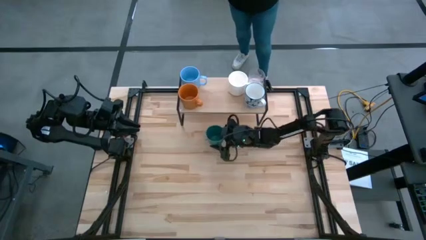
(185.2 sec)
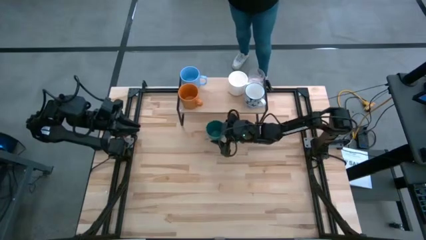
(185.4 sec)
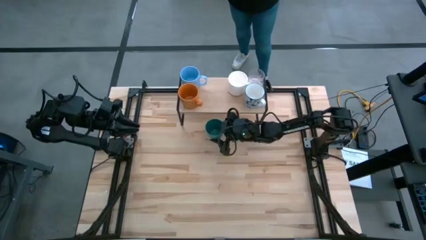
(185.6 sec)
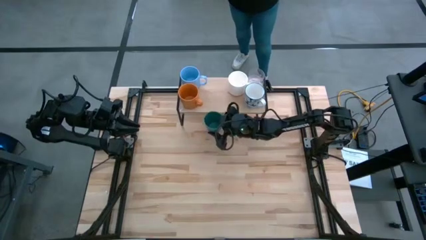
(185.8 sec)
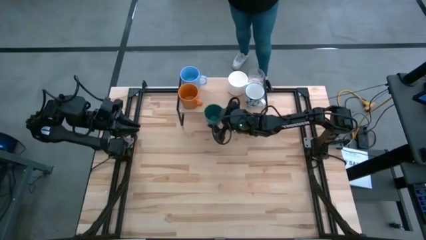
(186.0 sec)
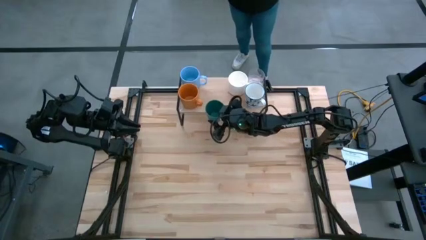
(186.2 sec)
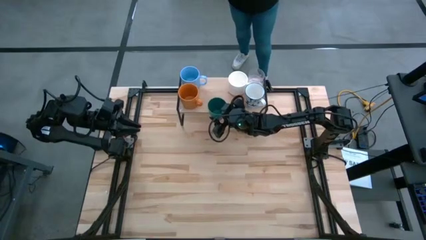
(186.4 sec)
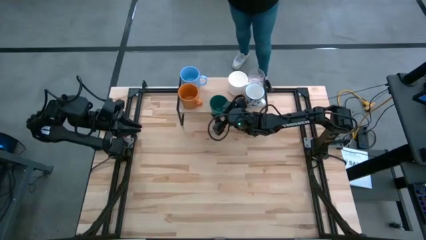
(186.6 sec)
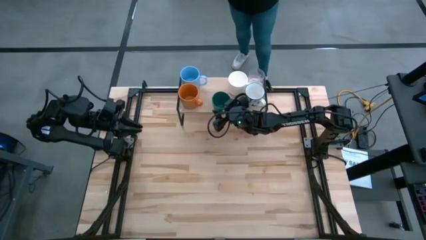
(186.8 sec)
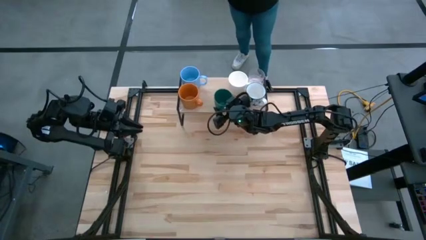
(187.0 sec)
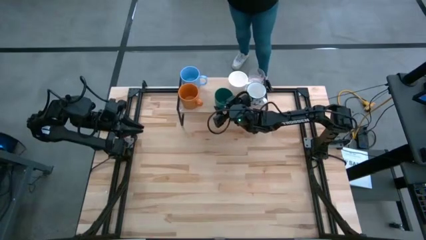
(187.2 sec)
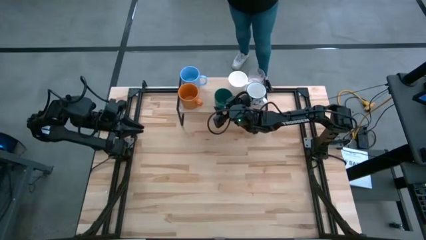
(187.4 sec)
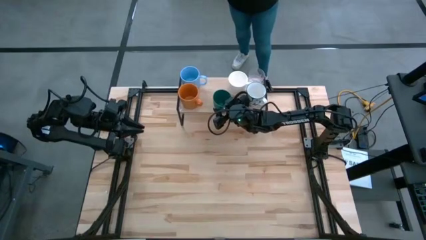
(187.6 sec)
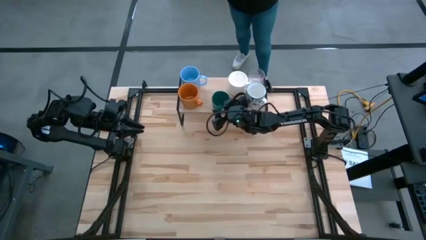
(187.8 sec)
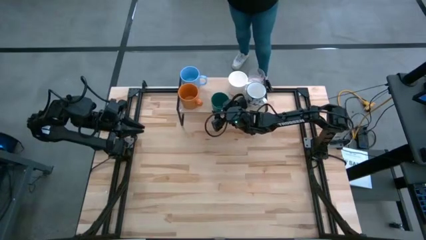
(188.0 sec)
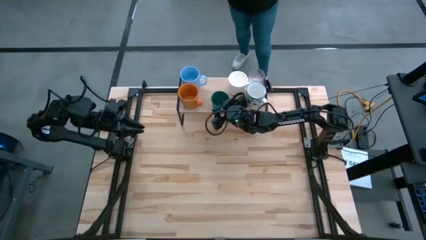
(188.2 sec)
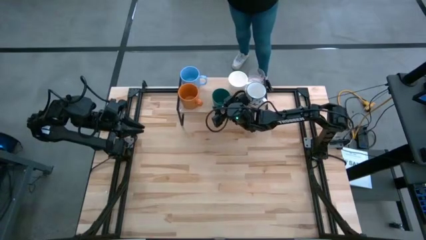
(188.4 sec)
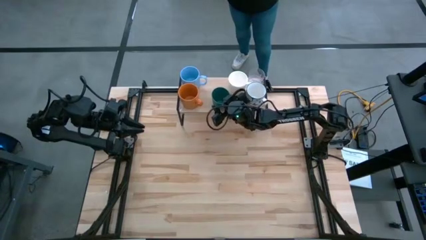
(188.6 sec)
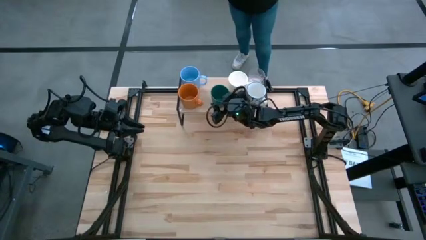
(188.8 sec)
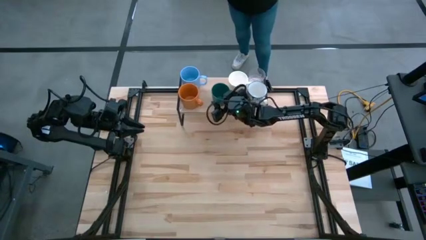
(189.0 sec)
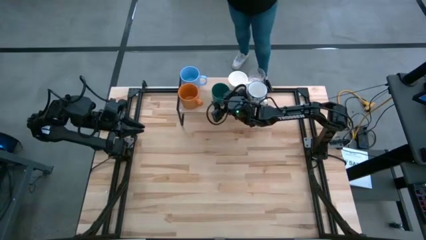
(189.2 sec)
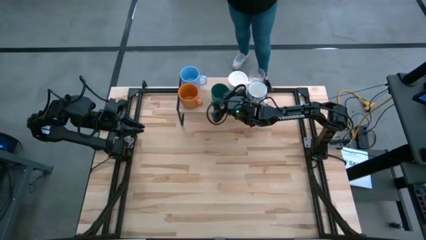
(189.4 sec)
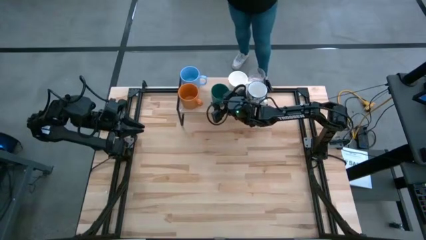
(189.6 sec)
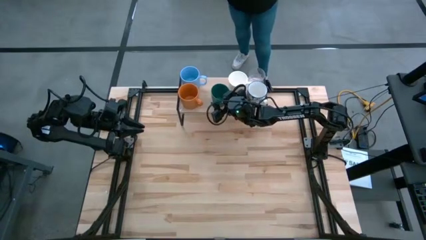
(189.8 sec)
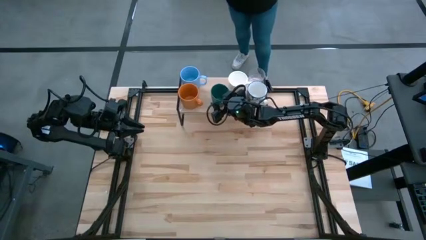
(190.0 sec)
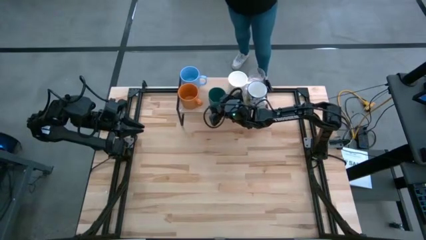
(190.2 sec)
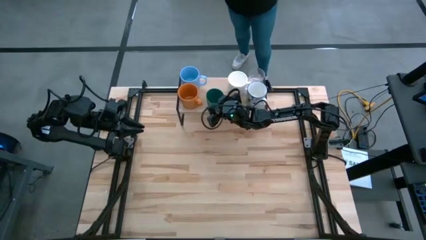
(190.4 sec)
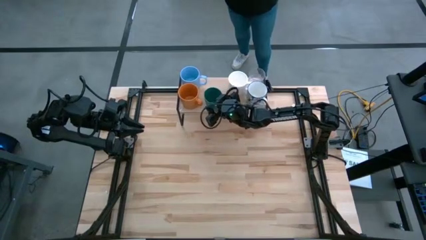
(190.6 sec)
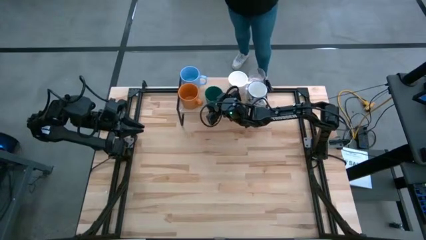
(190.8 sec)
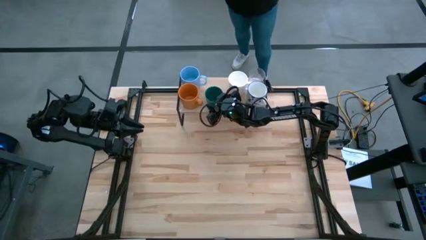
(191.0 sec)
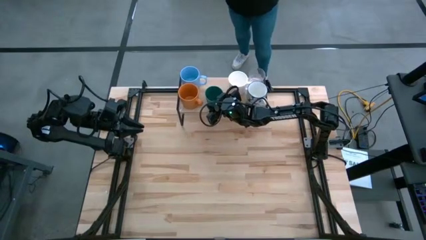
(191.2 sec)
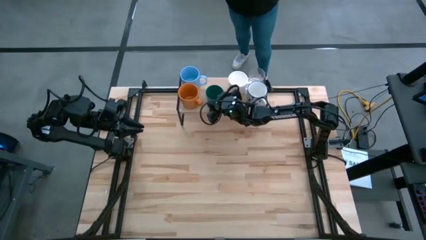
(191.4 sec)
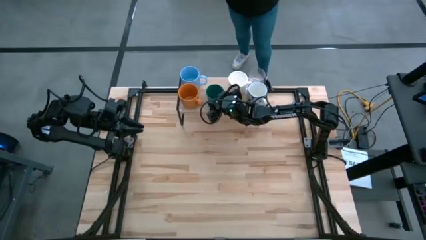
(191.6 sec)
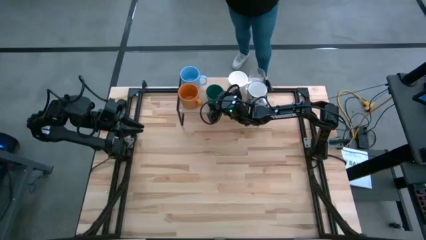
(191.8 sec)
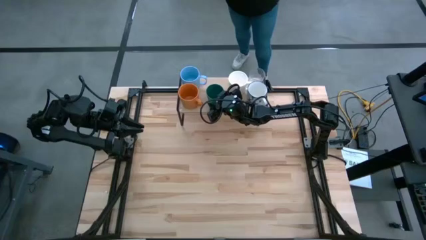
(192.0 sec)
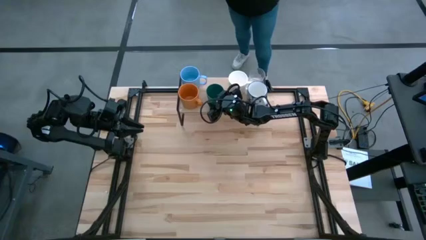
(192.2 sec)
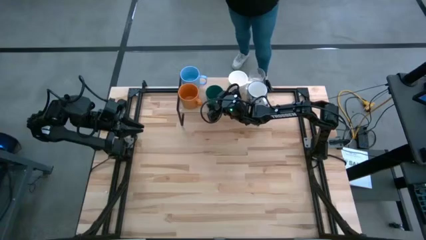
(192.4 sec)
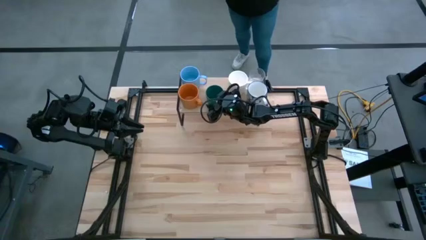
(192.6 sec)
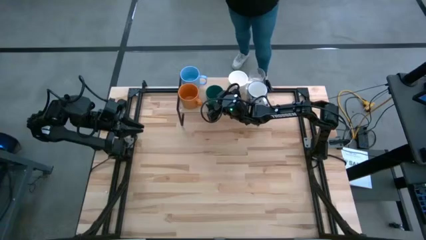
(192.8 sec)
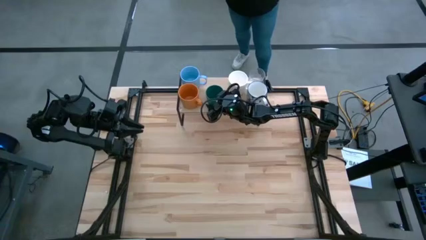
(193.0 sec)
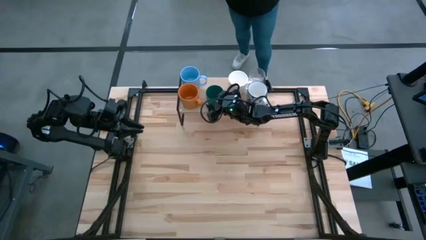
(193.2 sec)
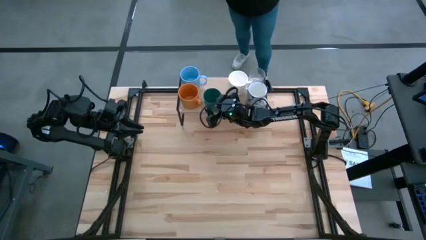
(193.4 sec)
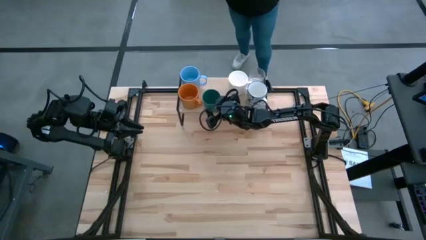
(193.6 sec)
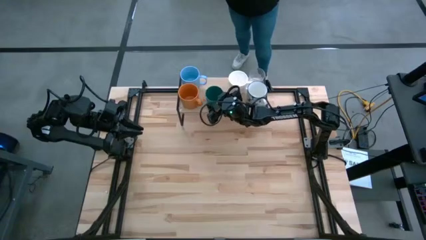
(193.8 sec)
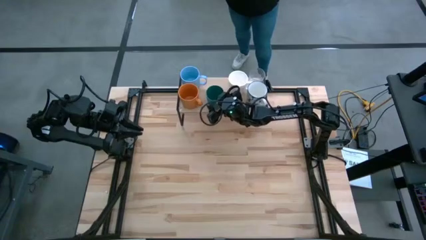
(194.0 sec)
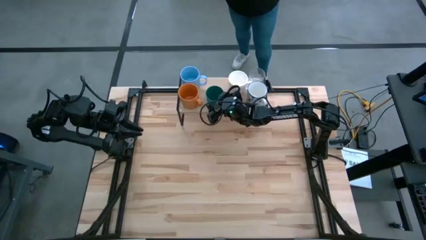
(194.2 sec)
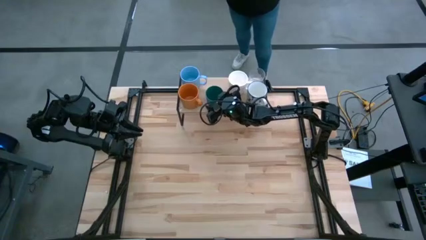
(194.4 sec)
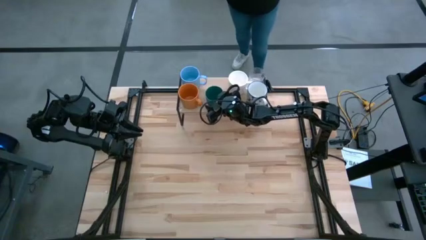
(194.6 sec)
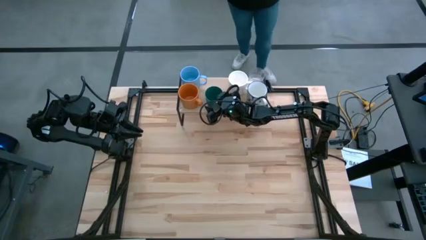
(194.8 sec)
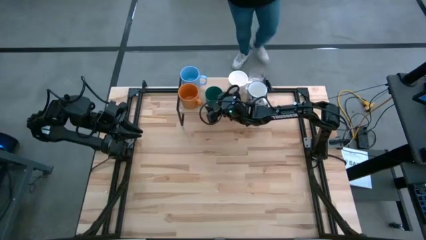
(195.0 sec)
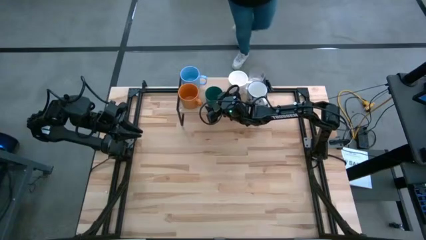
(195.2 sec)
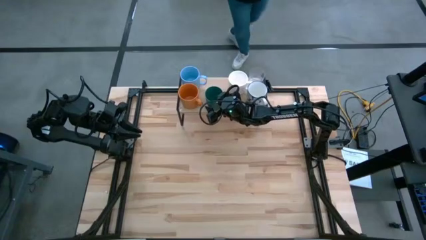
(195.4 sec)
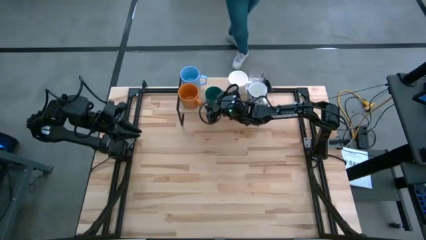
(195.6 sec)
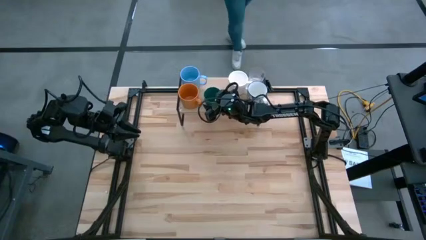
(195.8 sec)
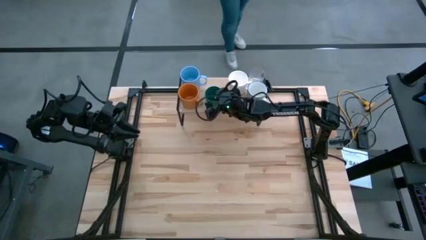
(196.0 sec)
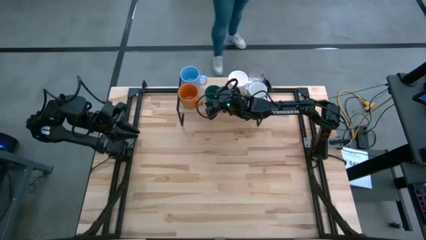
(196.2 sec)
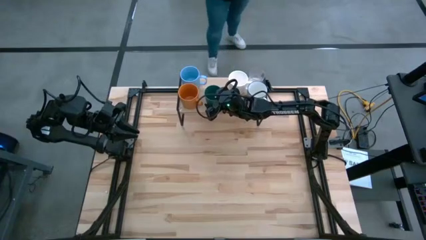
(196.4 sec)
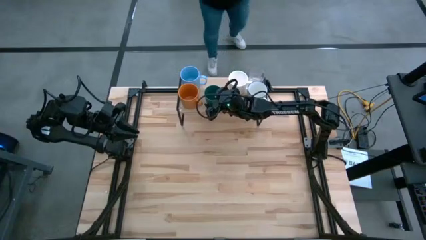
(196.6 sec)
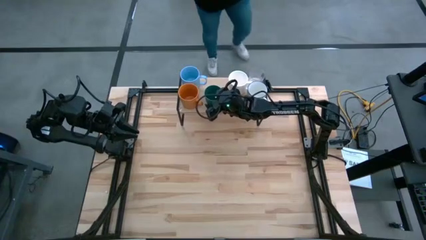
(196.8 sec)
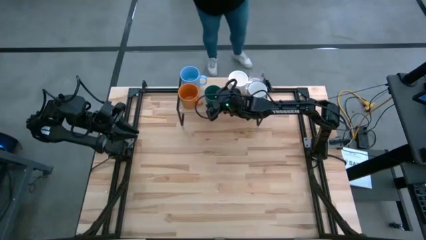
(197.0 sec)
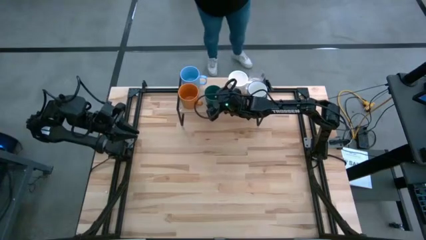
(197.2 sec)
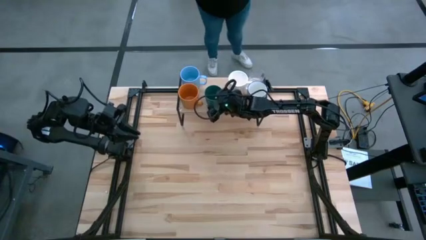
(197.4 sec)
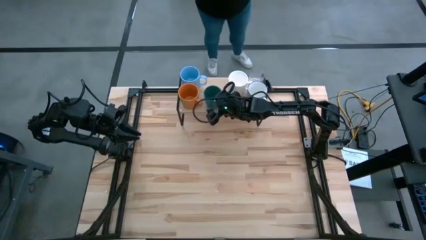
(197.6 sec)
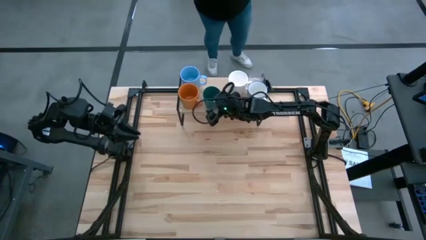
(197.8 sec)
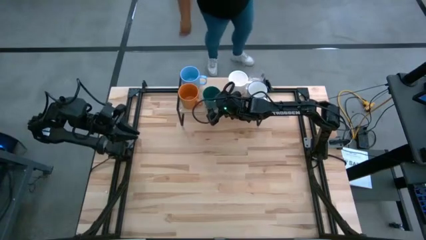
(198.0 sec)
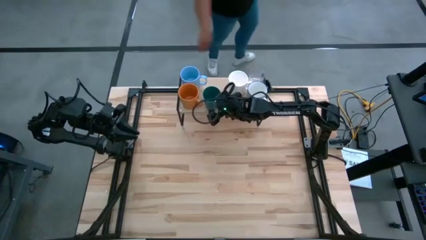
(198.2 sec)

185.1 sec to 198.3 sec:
Task: Stack small to large cups/mugs on shelf
Put the green cup on the shelf

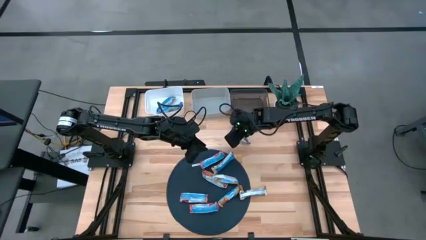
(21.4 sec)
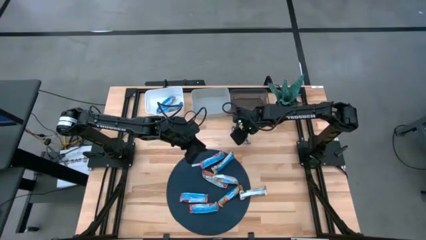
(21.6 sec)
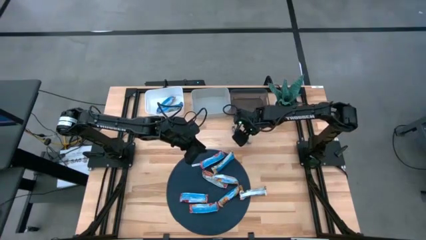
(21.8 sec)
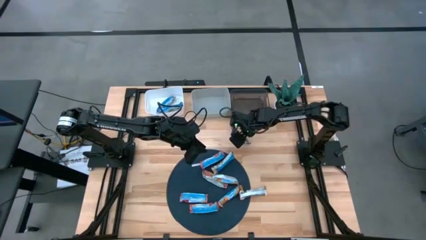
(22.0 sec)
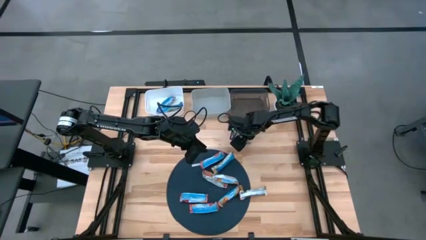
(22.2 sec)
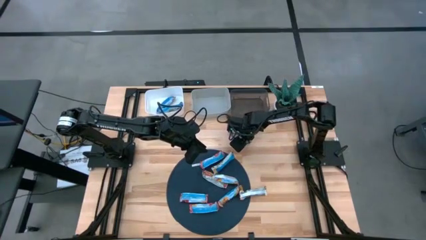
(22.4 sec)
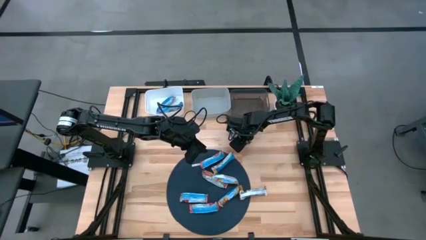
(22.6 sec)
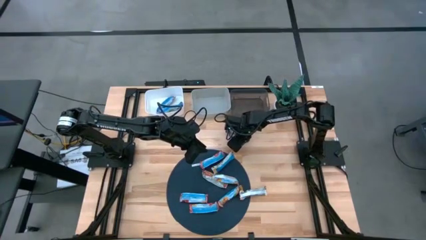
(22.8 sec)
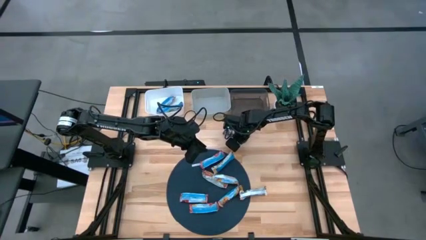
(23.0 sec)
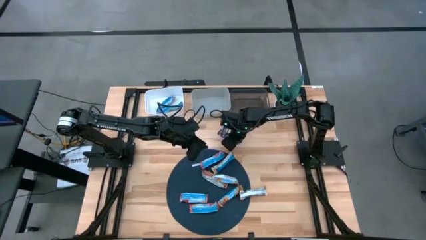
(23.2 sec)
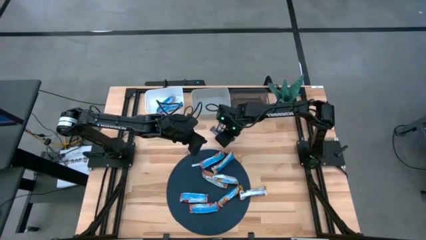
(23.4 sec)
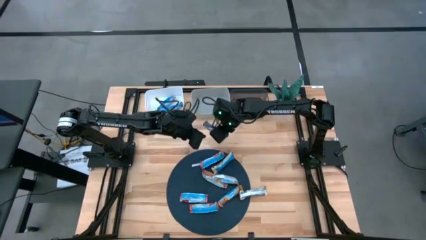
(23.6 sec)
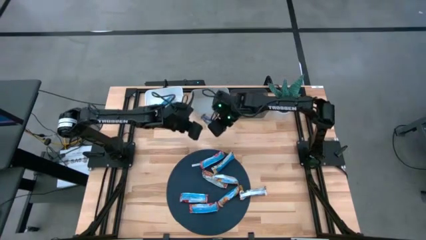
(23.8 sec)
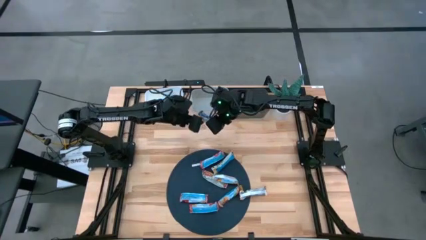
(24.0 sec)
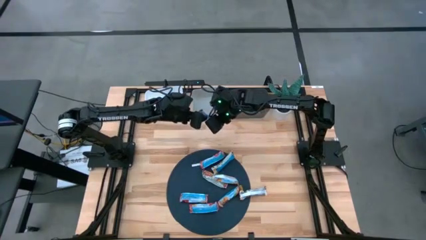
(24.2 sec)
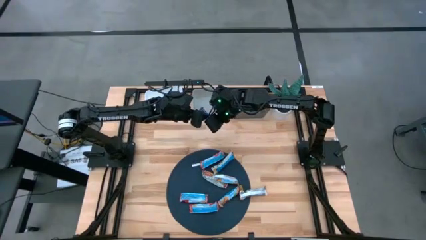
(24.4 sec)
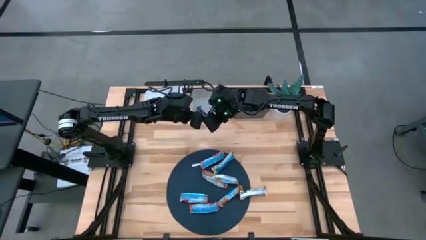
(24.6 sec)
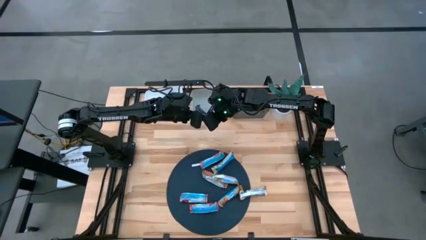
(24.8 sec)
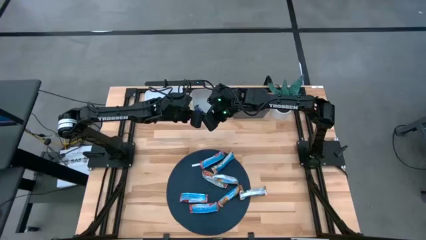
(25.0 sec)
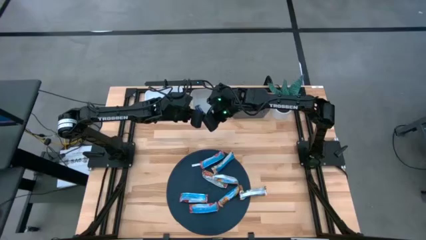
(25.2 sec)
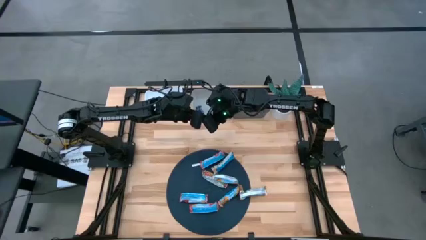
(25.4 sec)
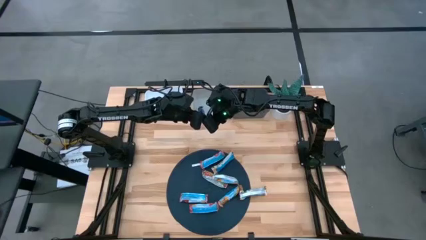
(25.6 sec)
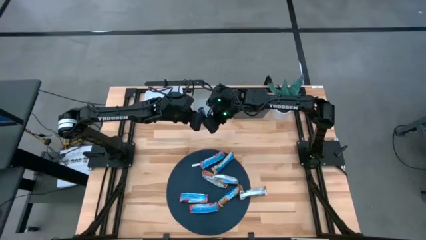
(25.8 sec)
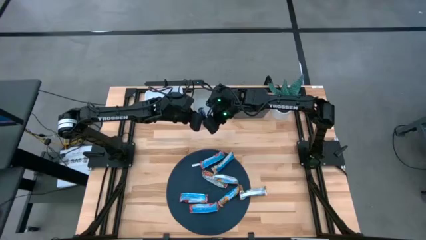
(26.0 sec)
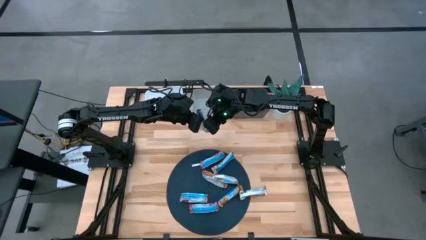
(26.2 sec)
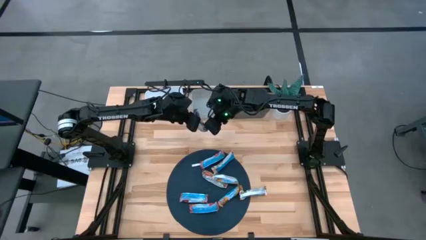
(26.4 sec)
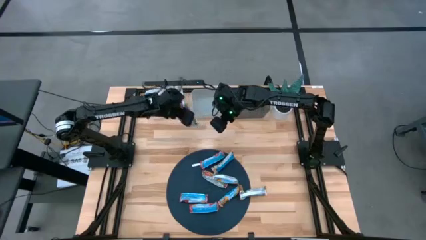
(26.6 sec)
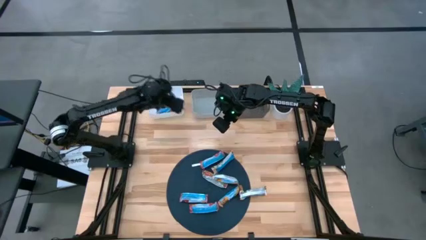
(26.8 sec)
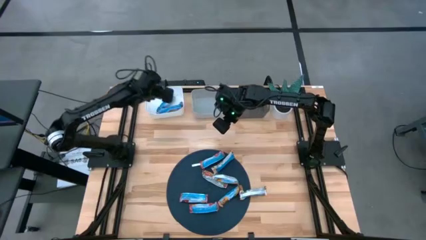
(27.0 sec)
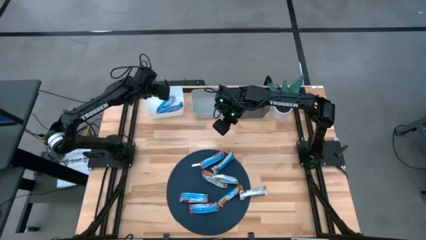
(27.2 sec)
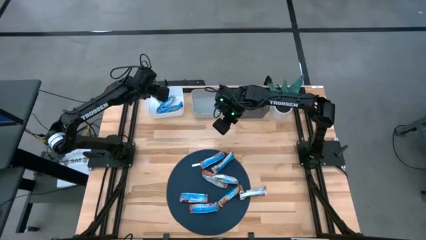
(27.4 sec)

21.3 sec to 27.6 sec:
Task: Pick and place Granola Bars by type
Put the blue granola bar into the white bin
